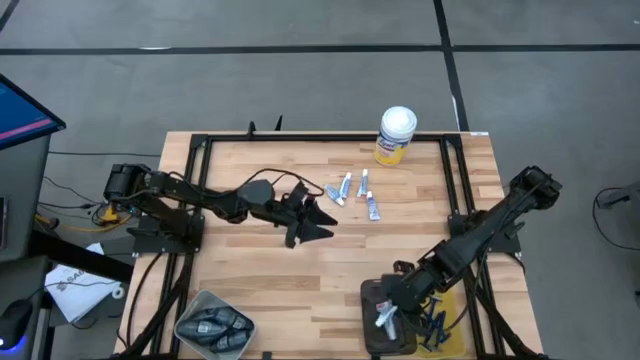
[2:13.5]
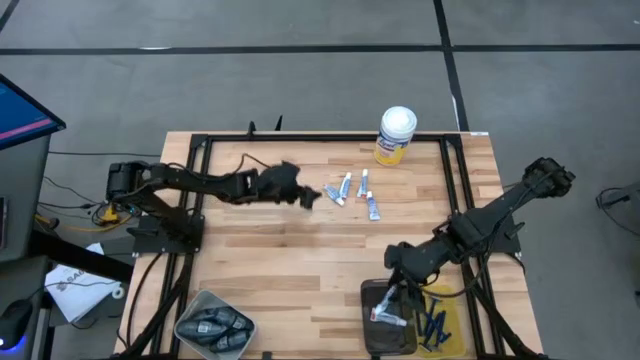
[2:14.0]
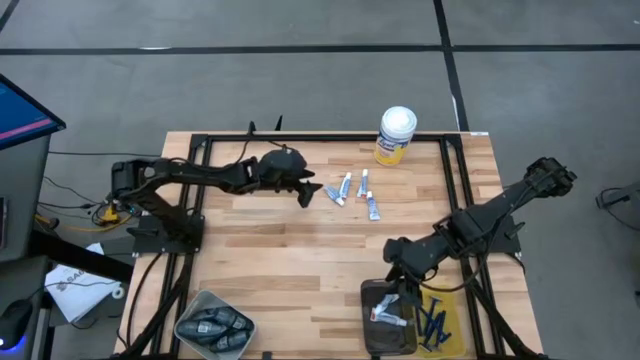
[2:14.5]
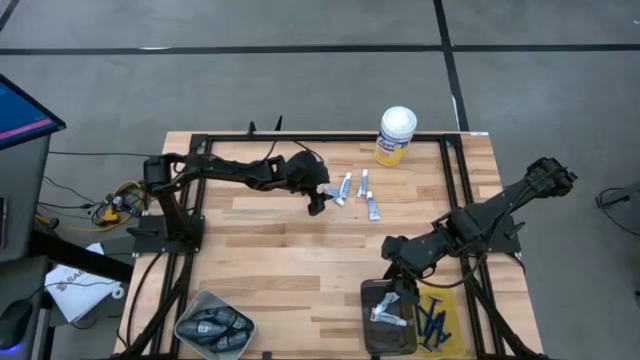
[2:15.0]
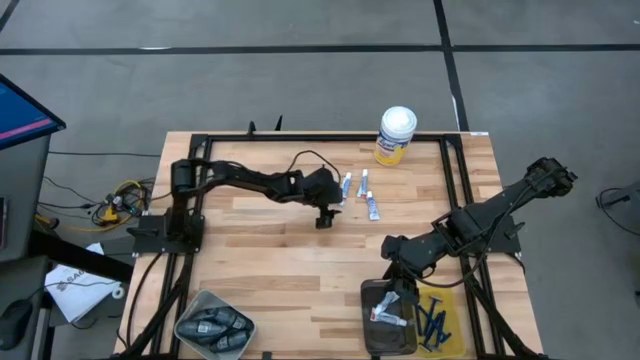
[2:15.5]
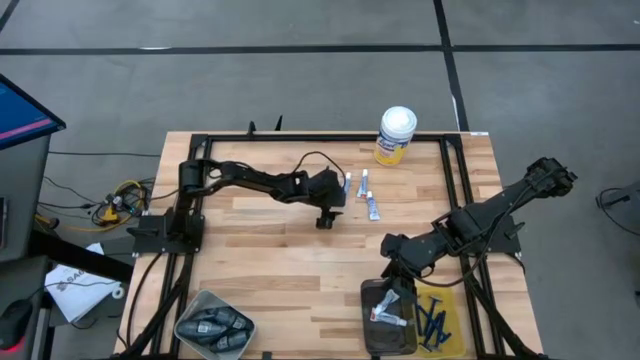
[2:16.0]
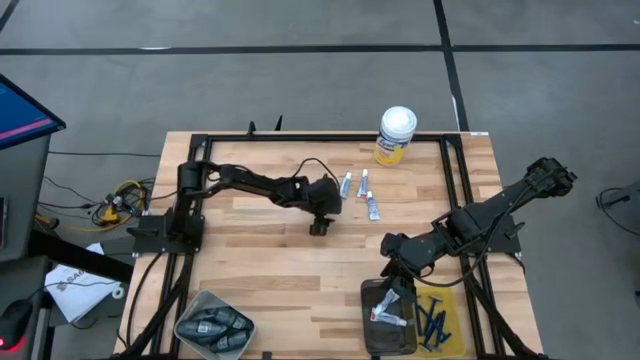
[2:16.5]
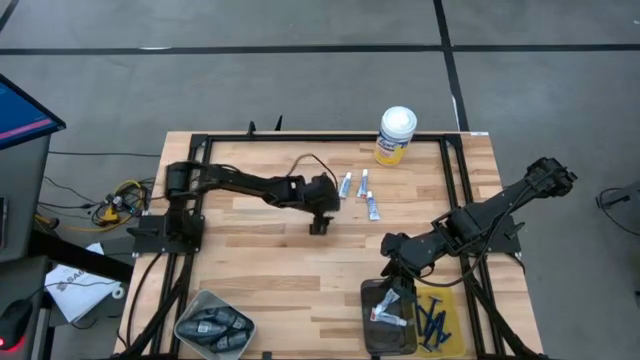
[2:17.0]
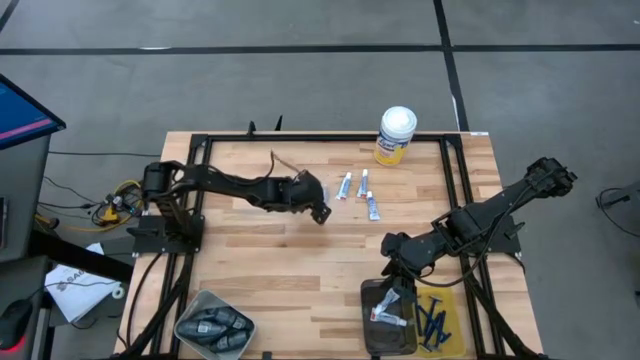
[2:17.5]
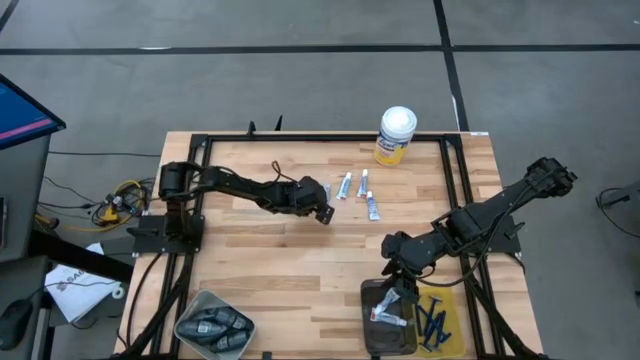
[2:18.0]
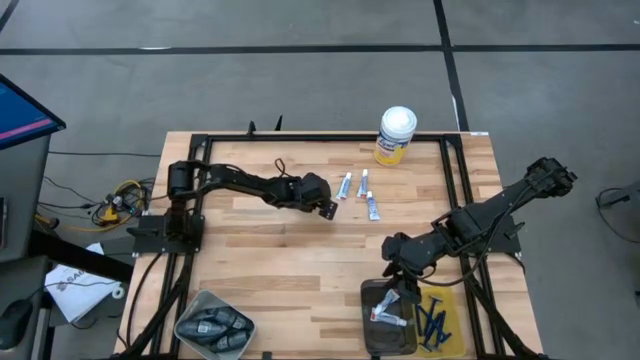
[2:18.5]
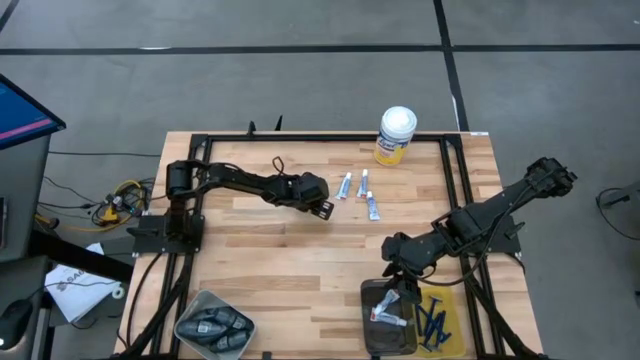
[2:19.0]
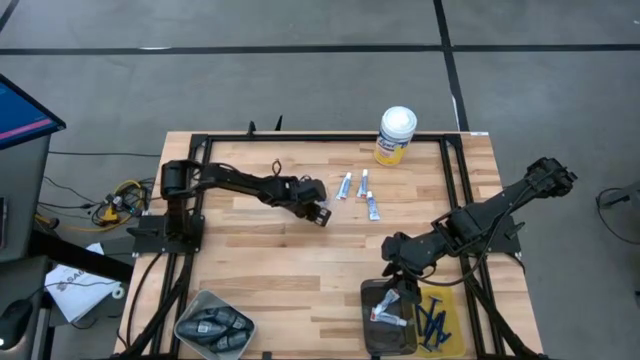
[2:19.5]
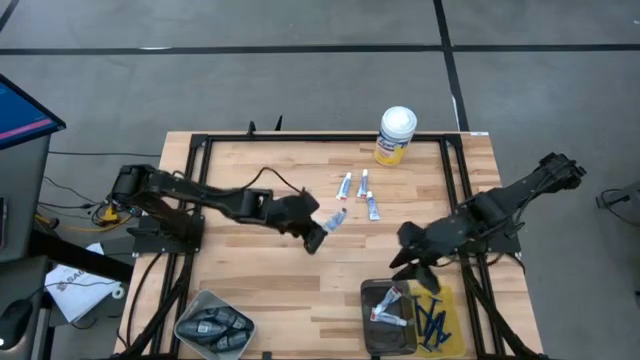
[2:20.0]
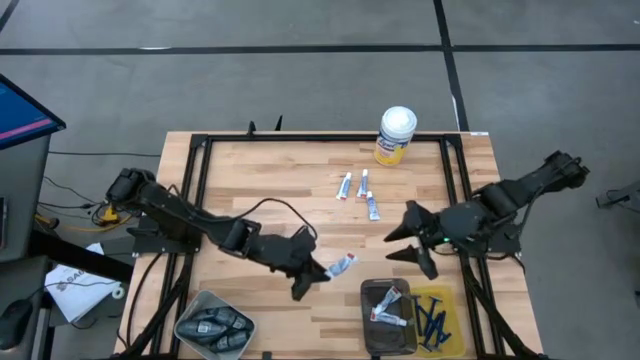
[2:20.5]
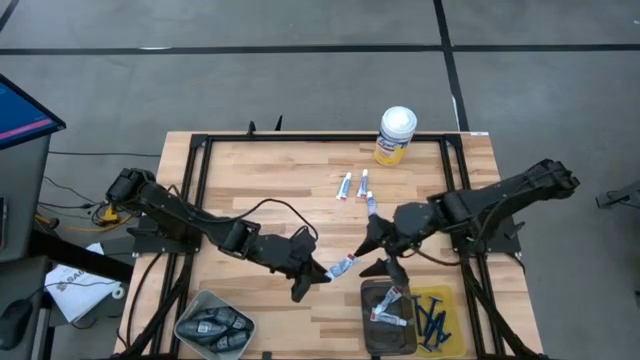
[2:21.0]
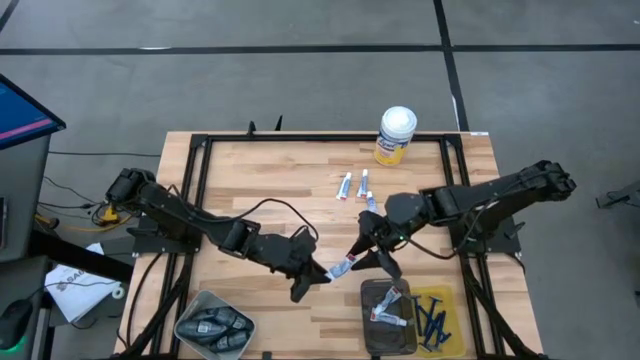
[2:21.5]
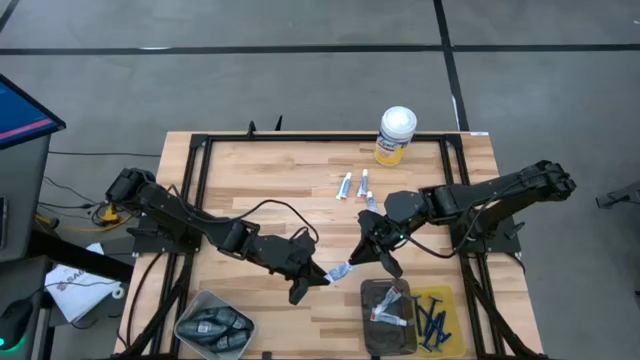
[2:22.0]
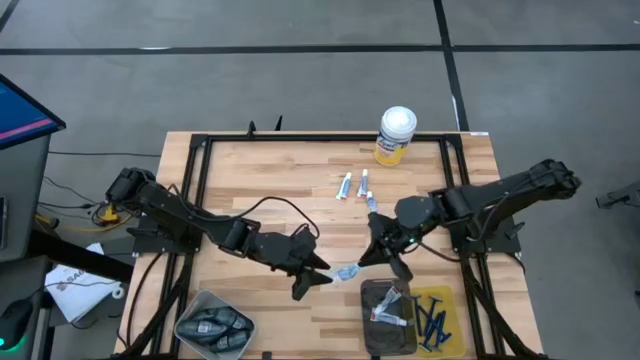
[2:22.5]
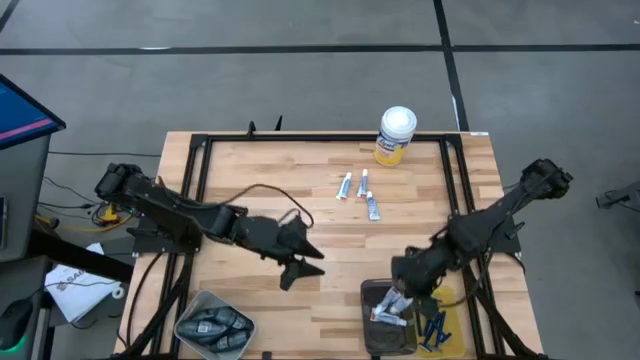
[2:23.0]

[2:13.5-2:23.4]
Task: Pick & Place Travel size toiletries
Put the toothpaste into the black bin

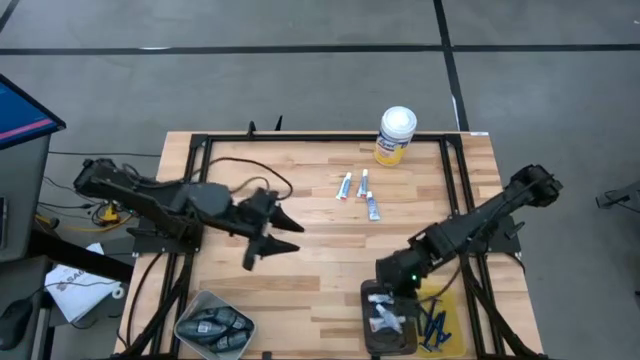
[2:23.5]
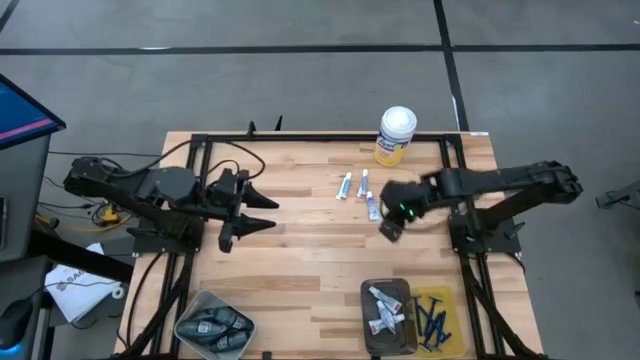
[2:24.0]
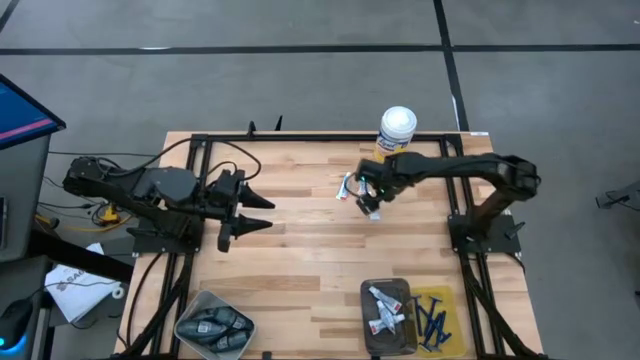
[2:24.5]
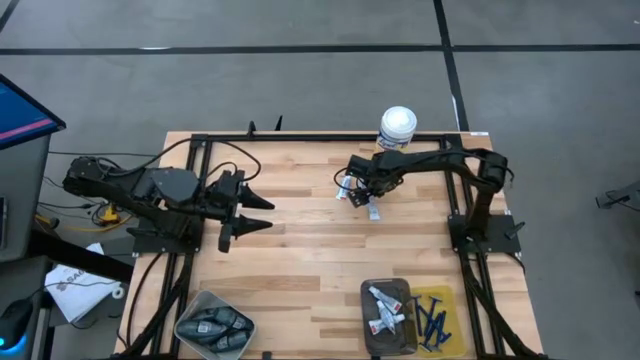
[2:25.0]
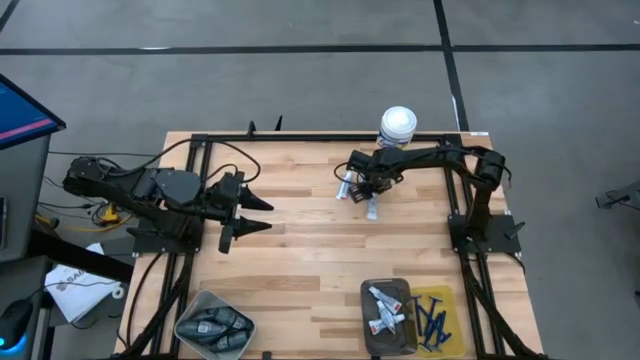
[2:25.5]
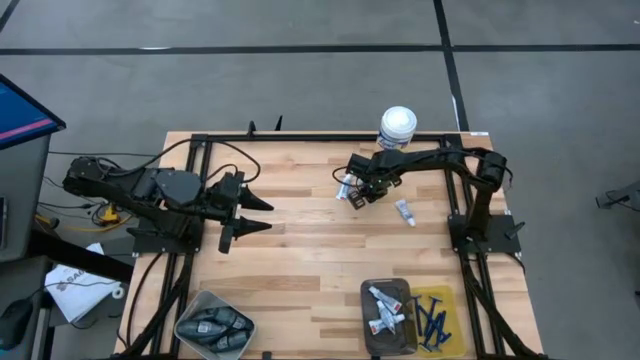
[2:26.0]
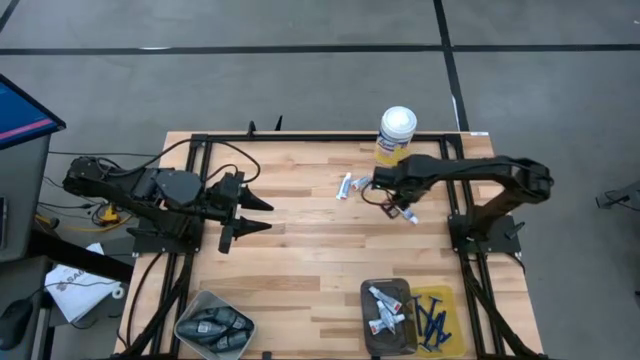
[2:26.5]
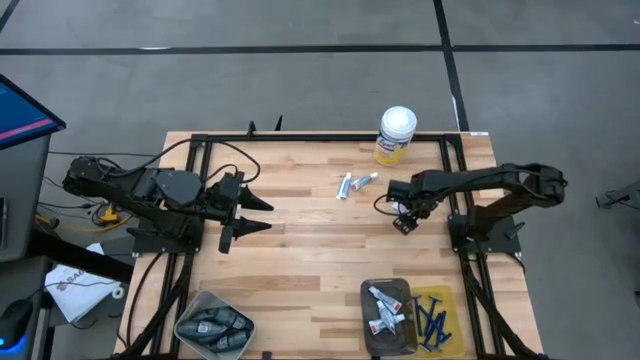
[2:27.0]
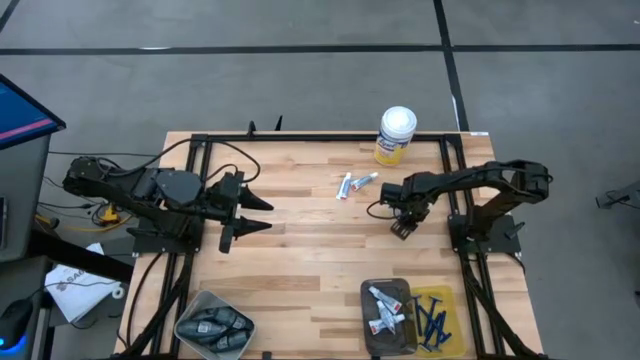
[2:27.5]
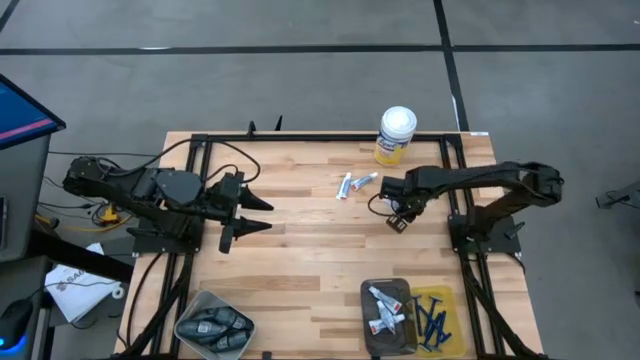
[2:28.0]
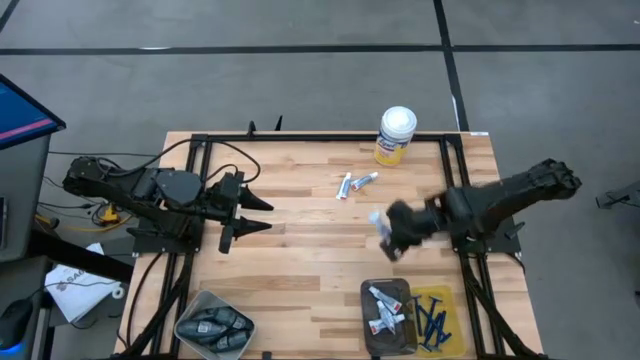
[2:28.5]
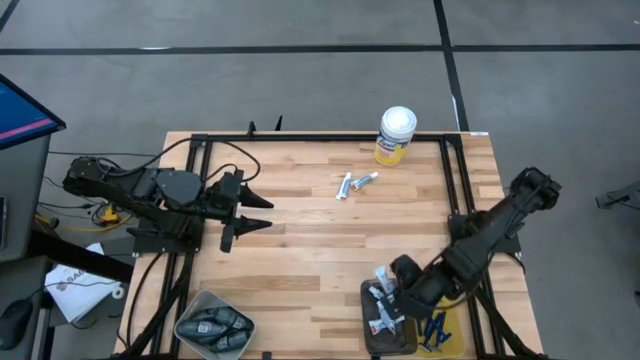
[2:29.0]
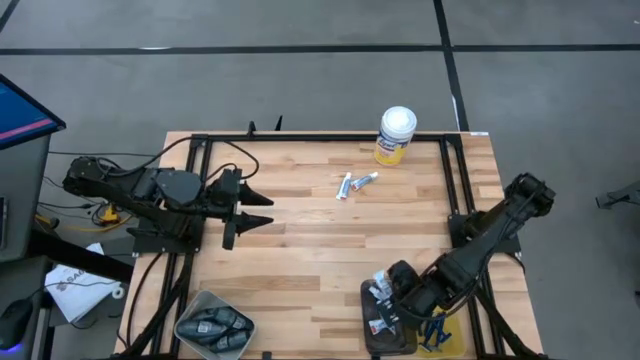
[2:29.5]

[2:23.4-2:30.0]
Put the toothpaste into the black bin

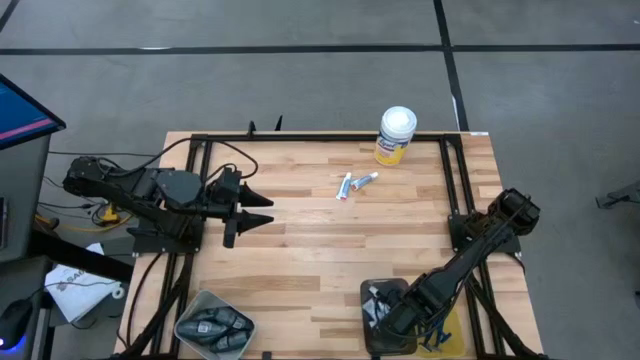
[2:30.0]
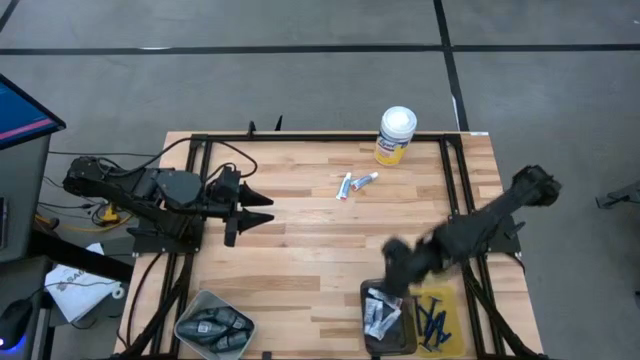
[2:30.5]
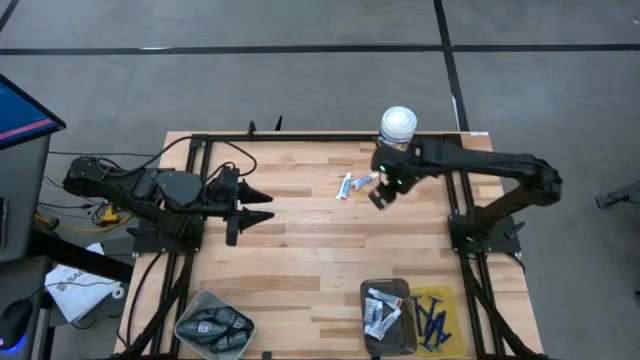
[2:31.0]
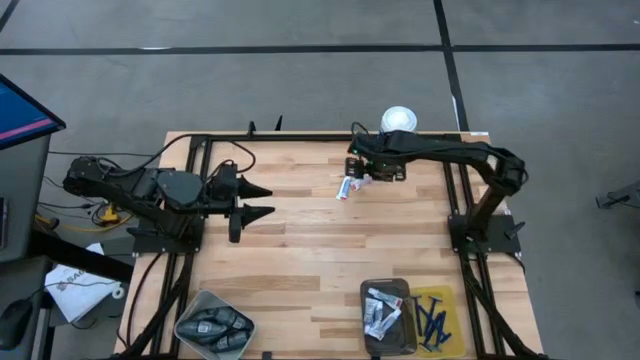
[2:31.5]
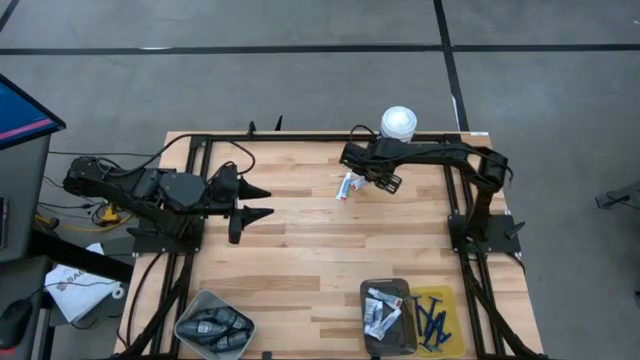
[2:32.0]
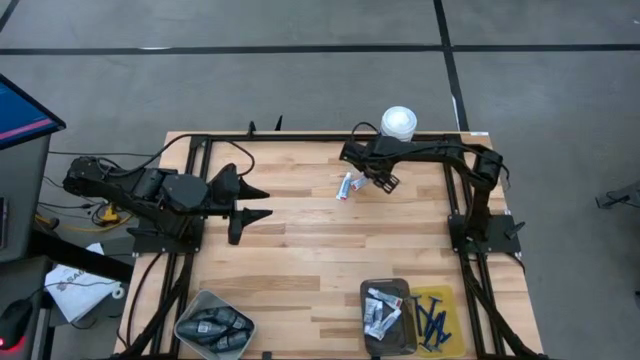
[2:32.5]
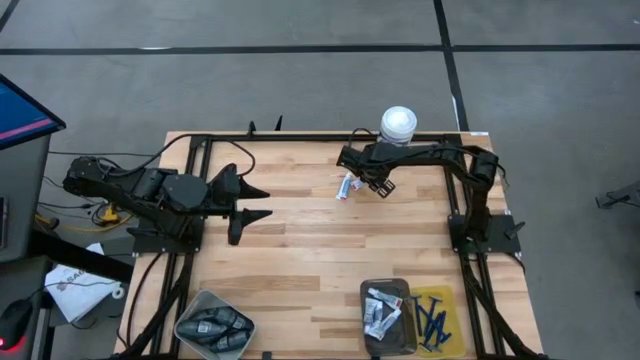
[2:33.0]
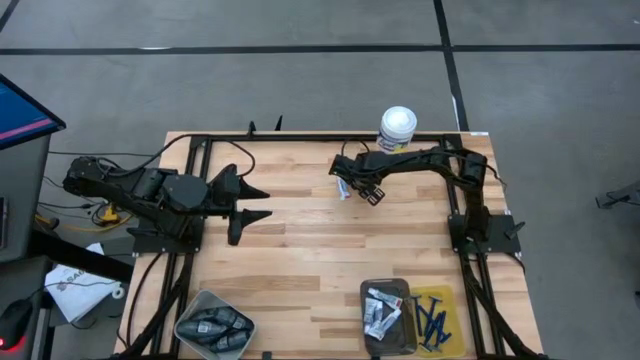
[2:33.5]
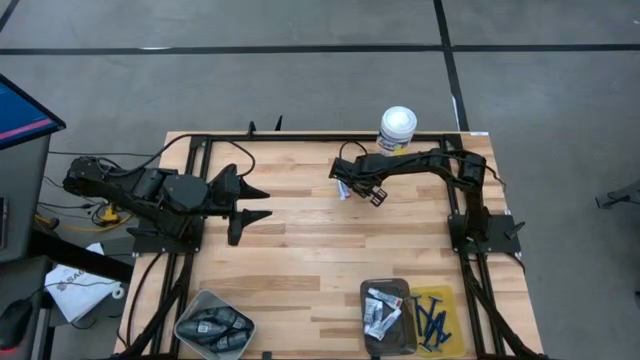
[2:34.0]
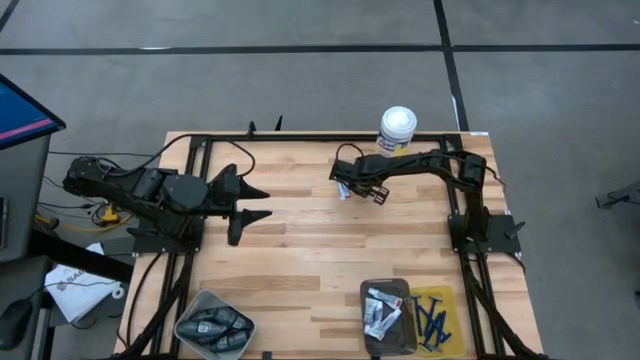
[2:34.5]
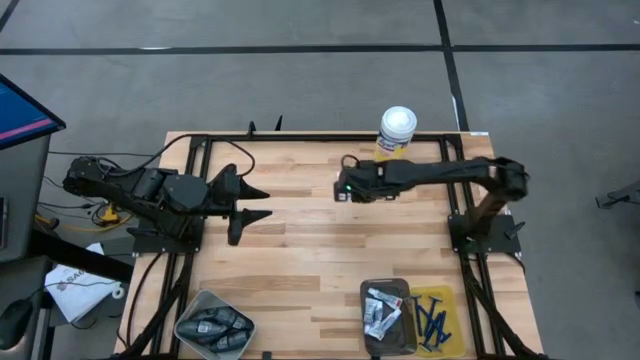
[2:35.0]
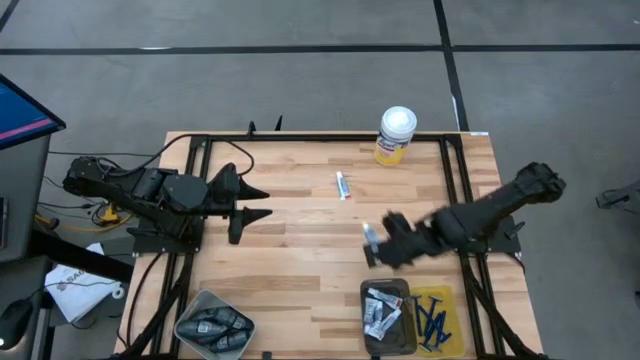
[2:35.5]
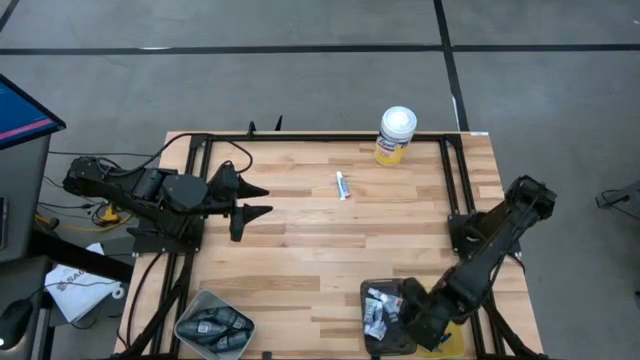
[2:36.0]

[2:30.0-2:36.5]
Put the toothpaste into the black bin
